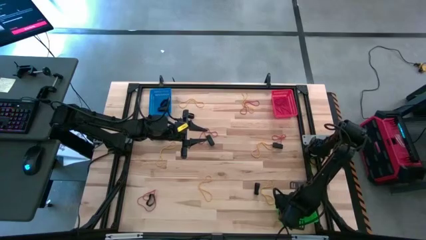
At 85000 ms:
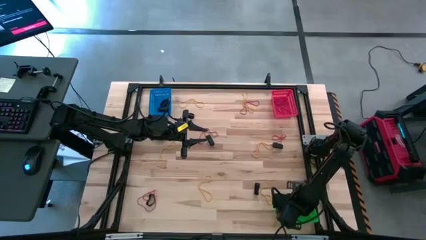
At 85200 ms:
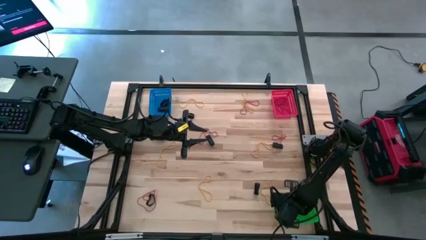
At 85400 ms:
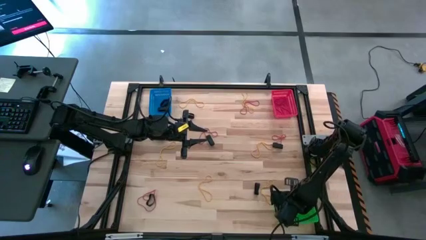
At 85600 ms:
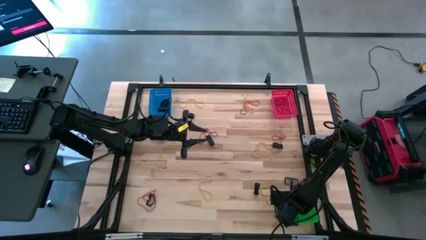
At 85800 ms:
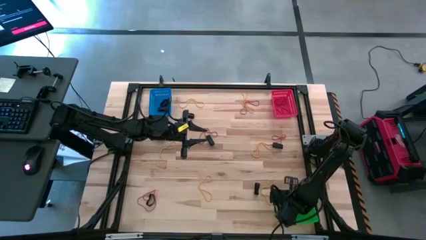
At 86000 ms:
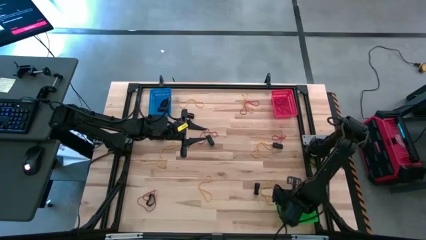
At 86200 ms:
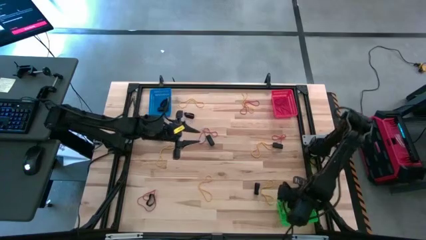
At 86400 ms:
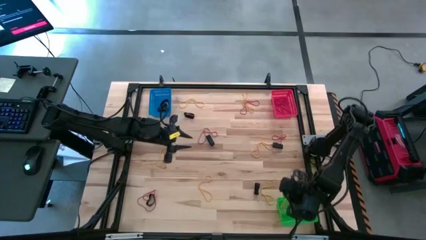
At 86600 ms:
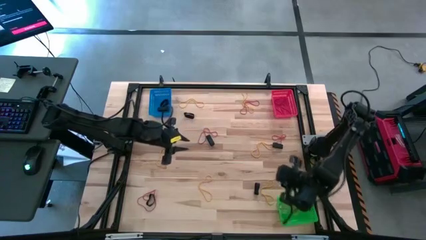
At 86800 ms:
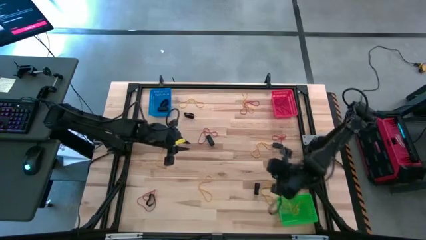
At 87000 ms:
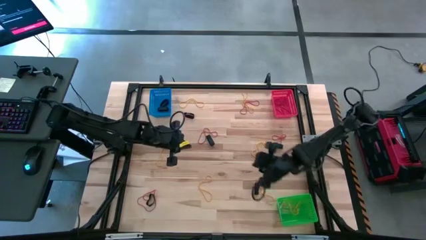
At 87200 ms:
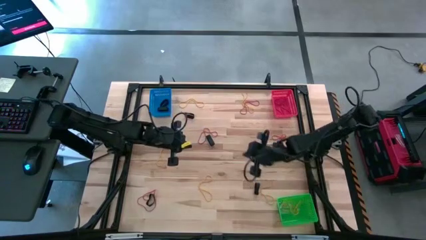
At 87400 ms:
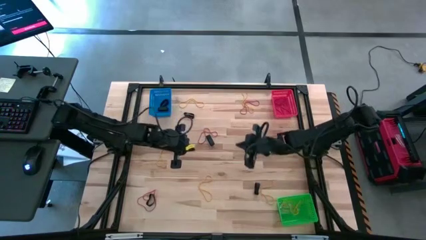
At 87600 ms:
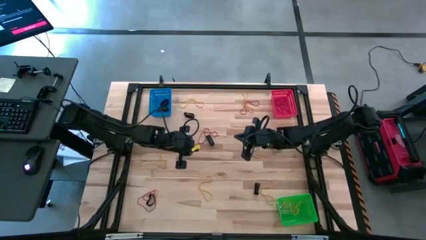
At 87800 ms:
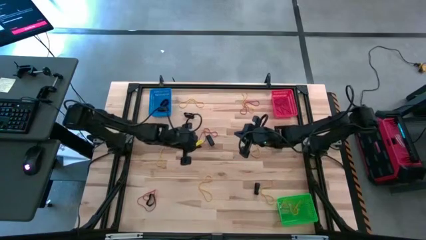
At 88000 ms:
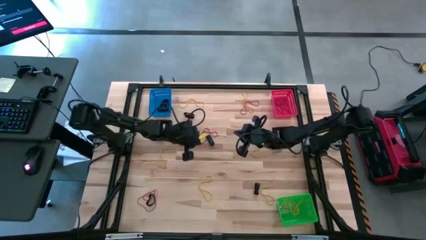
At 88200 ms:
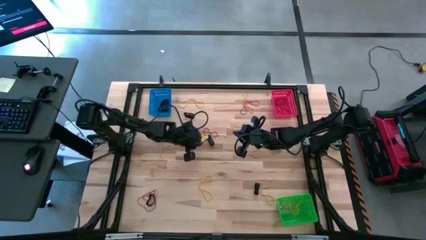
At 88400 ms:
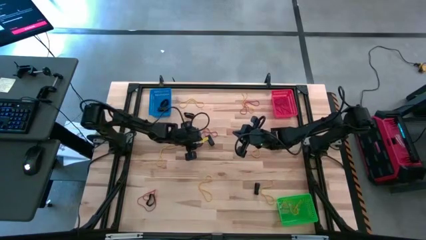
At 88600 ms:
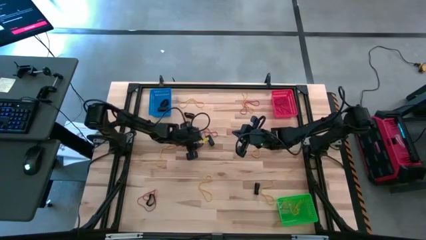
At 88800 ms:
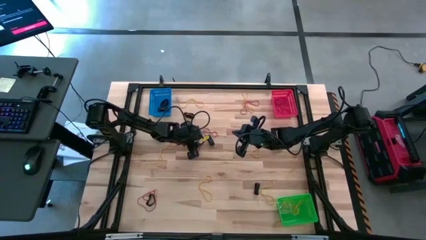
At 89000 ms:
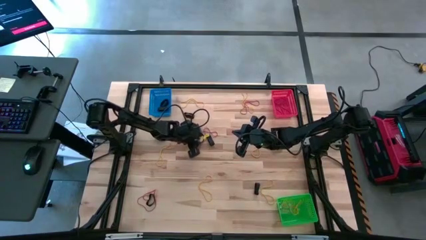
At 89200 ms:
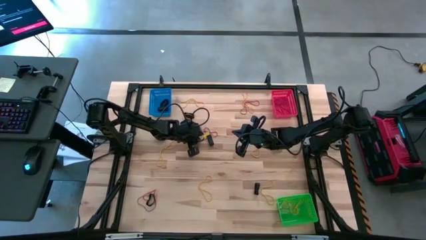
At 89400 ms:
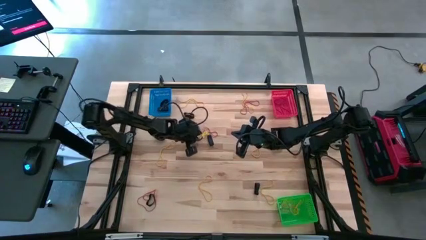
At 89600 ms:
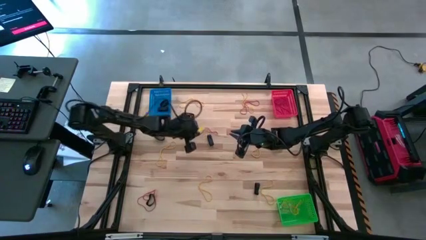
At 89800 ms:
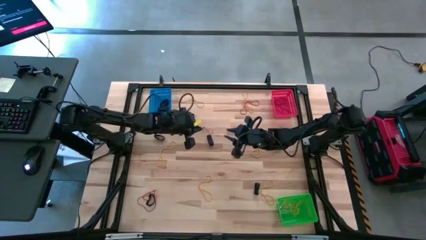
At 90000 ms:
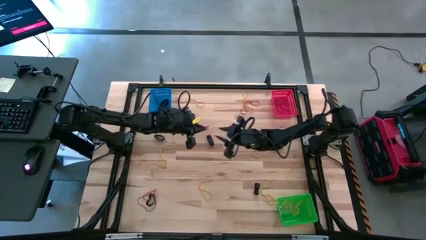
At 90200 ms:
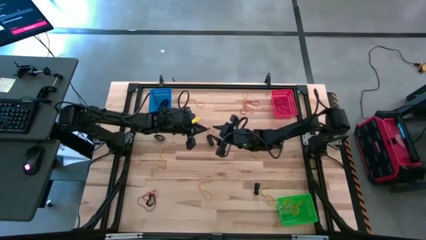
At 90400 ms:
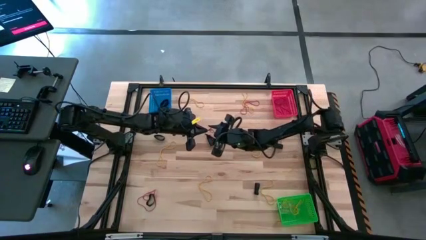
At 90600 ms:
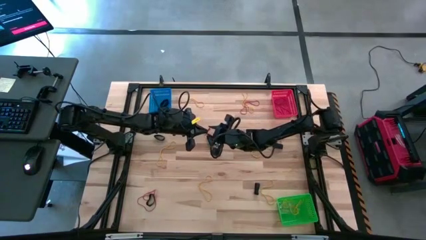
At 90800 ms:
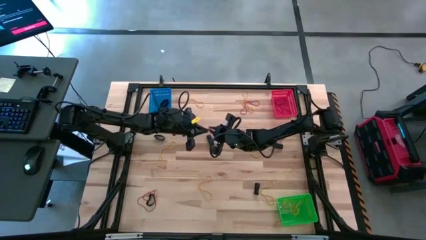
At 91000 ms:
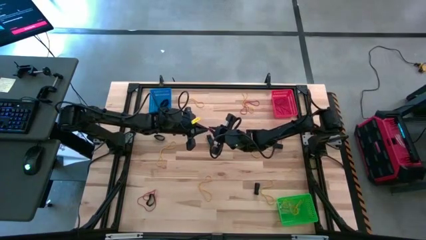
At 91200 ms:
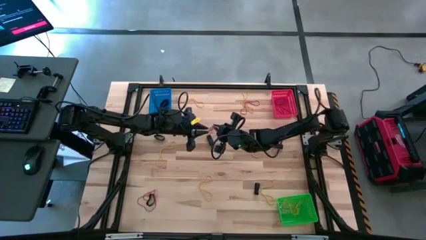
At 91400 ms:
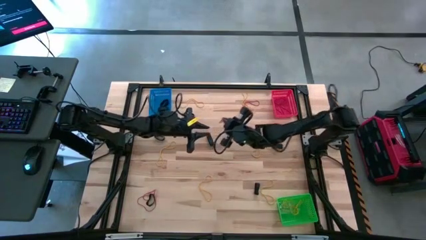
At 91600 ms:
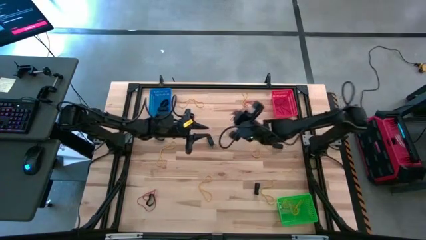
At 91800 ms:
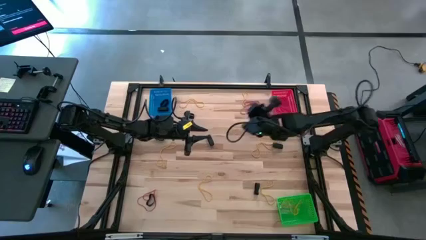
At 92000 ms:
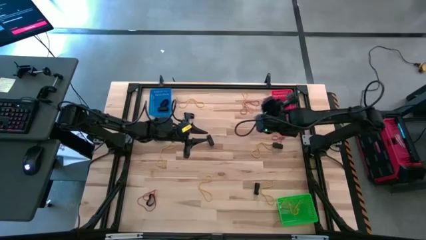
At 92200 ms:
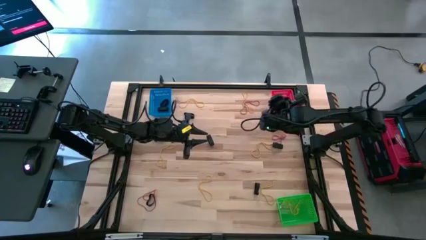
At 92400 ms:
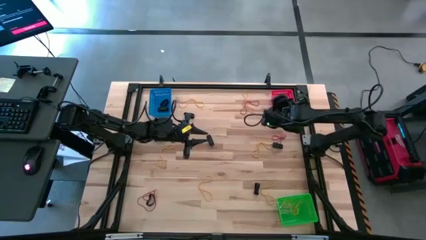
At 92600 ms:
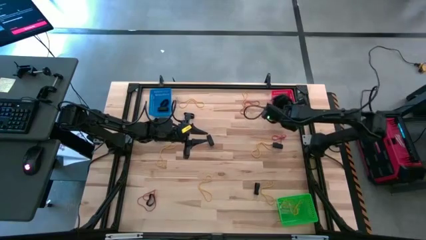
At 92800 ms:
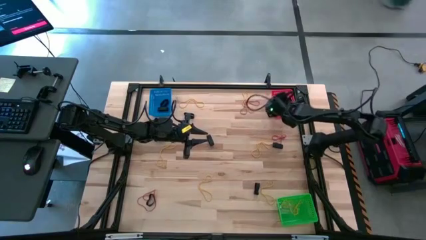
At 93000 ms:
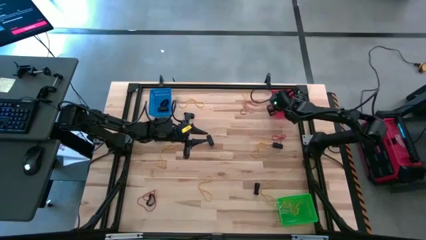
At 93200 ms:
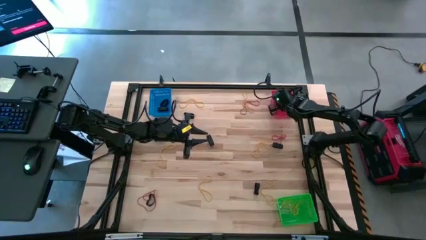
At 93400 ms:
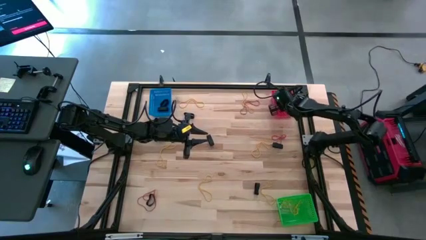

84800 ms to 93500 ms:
Task: Sort rubber bands into baskets
Put the red rubber band into the red bin

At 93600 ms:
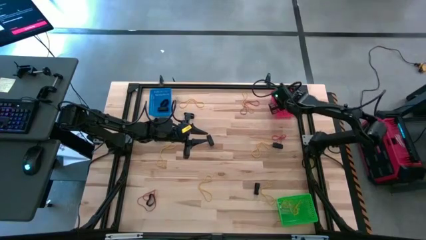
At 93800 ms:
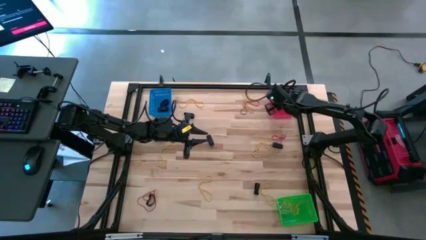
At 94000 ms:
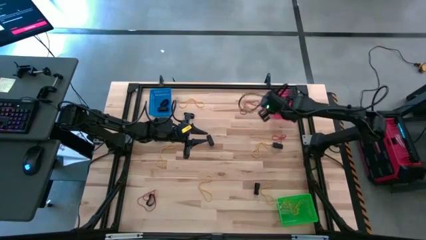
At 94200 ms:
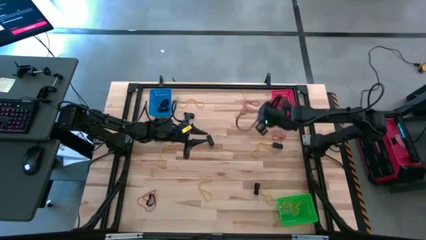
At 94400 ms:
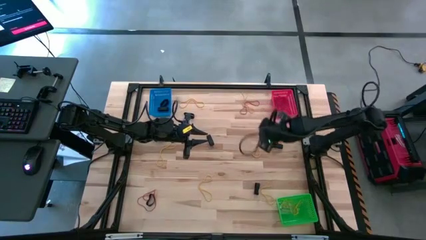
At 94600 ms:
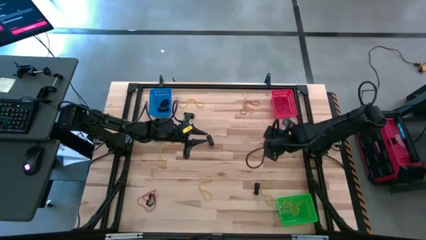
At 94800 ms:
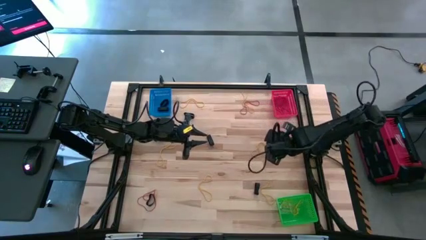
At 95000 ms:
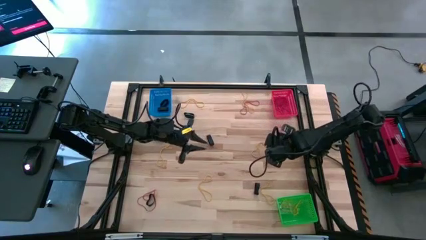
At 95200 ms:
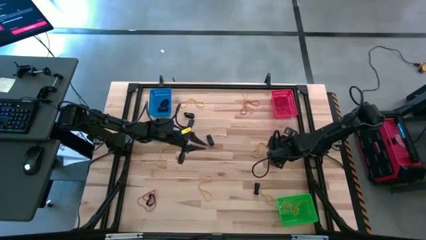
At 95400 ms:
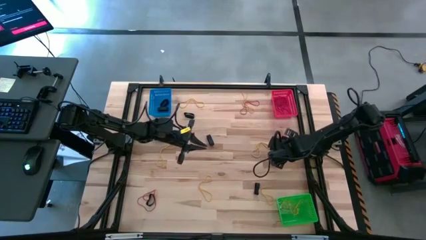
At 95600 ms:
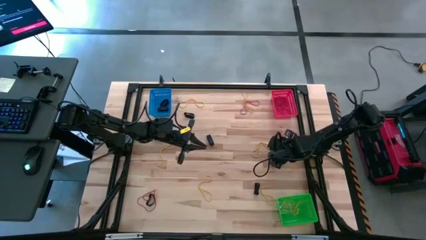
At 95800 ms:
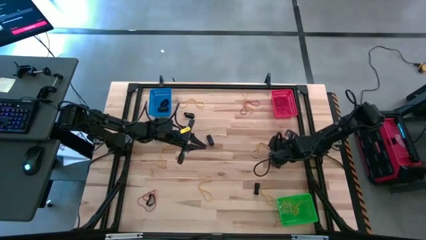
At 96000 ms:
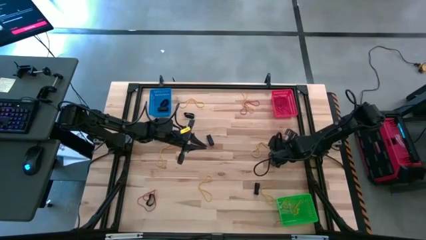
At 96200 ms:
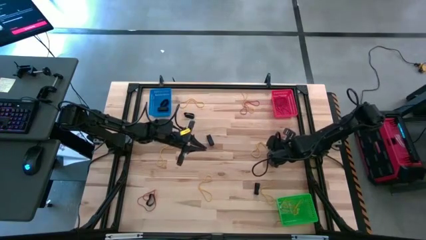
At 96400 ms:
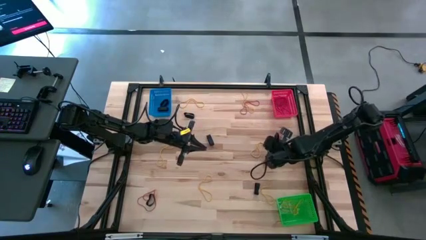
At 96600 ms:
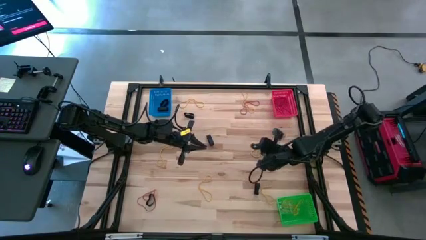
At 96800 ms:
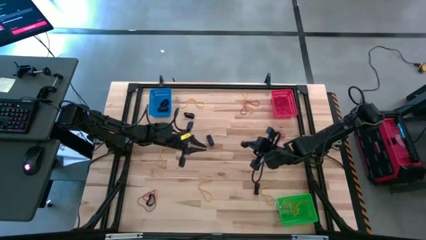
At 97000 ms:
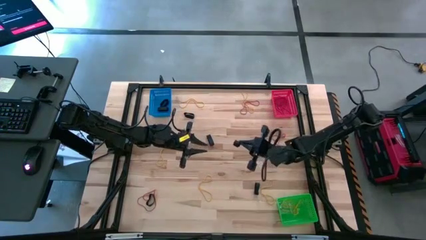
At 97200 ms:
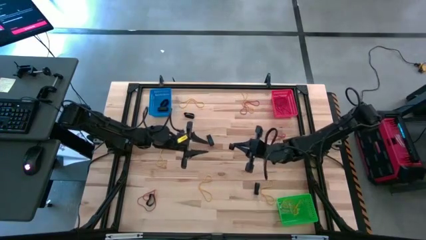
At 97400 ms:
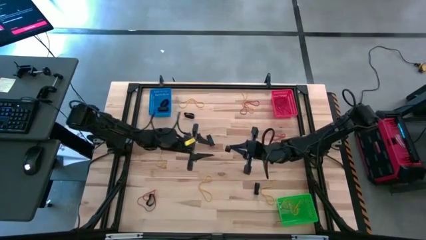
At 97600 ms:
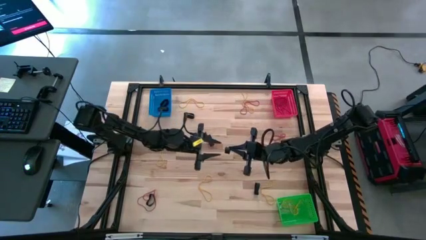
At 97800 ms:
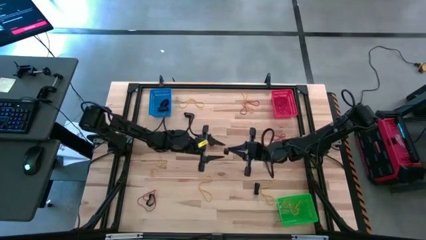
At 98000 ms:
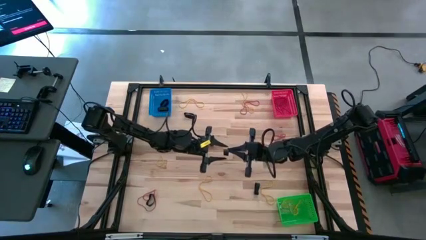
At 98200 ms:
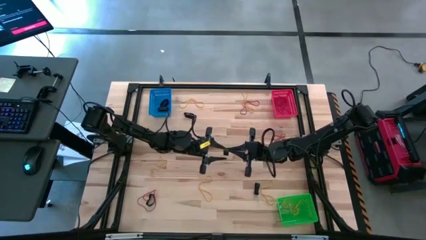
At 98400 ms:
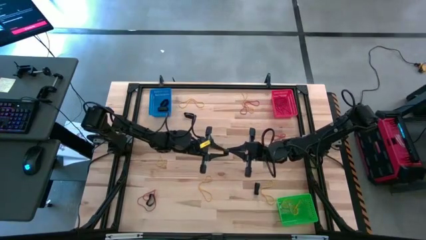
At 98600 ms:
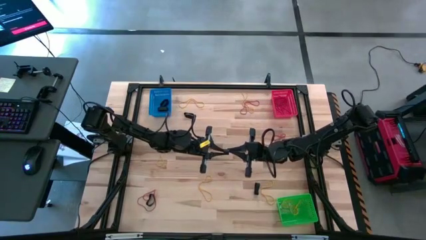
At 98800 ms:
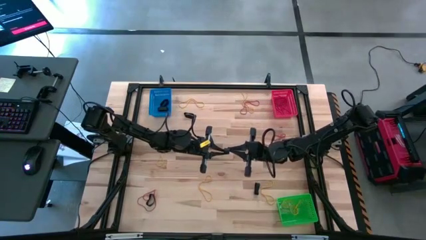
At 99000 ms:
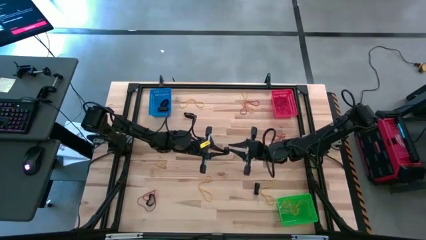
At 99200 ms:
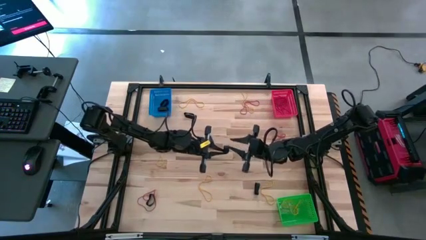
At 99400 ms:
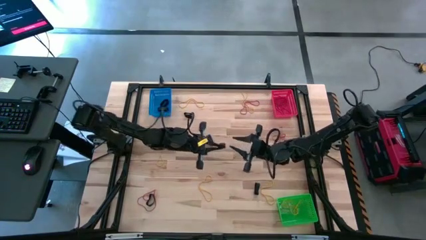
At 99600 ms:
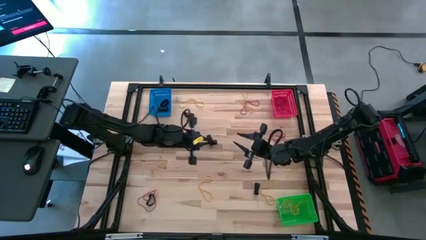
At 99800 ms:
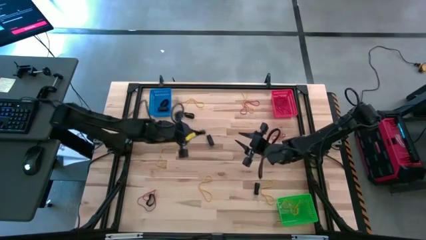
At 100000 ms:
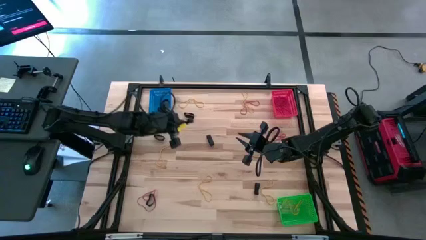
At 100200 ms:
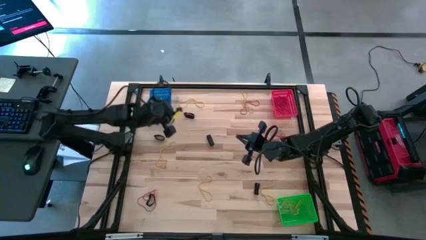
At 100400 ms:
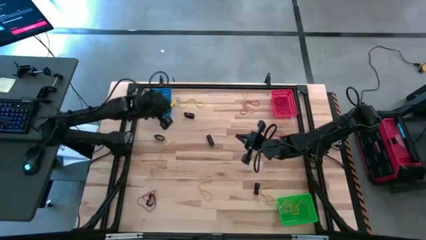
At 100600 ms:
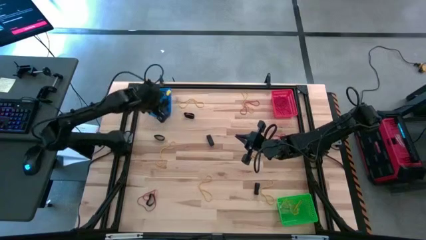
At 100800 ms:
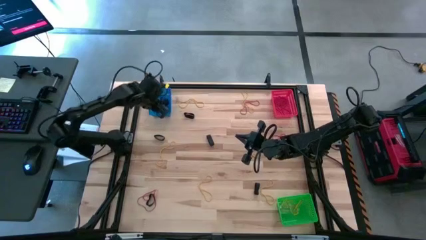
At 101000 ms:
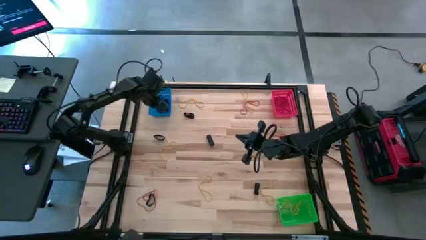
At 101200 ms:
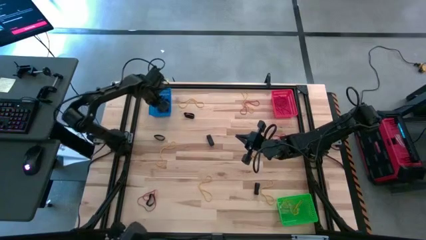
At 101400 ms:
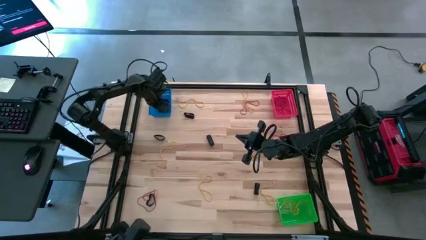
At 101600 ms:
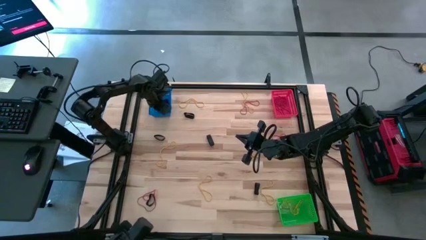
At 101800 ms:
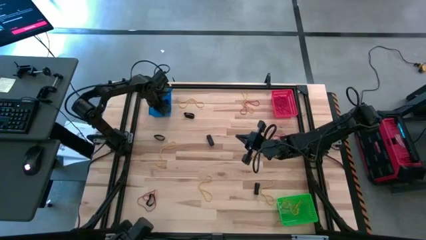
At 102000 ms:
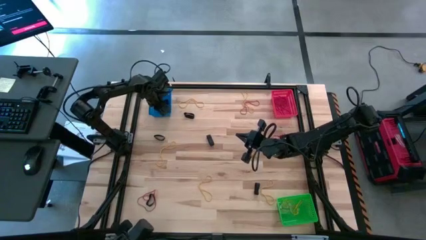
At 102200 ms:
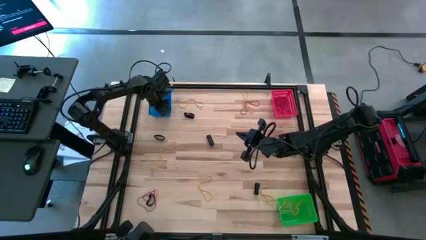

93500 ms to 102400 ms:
Put the black rubber band into the blue bin
